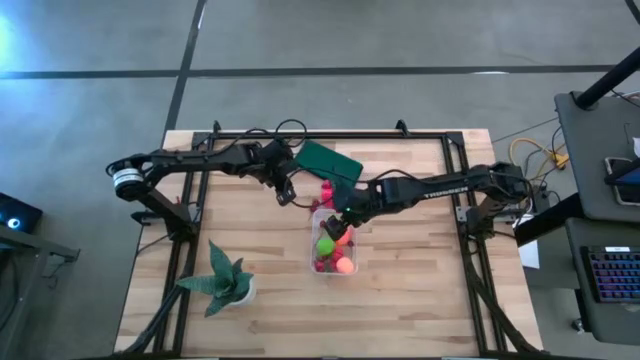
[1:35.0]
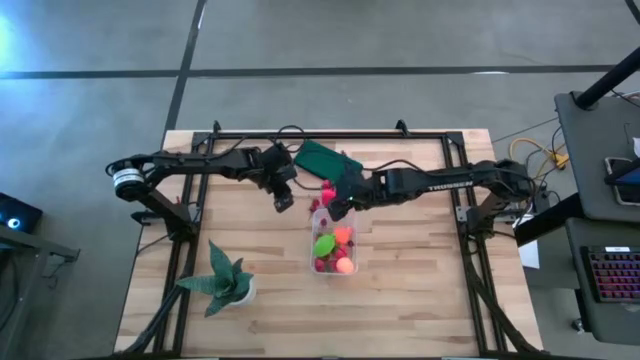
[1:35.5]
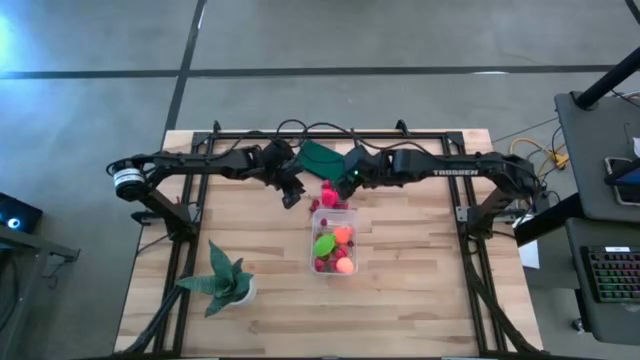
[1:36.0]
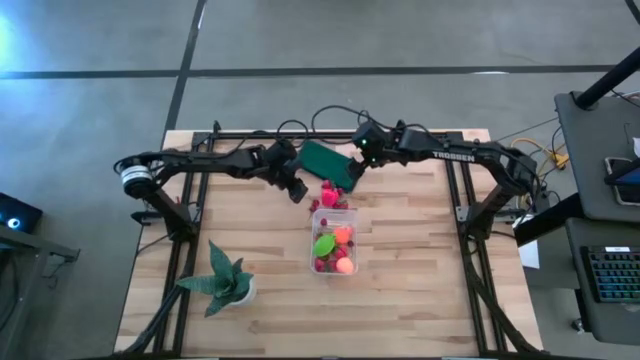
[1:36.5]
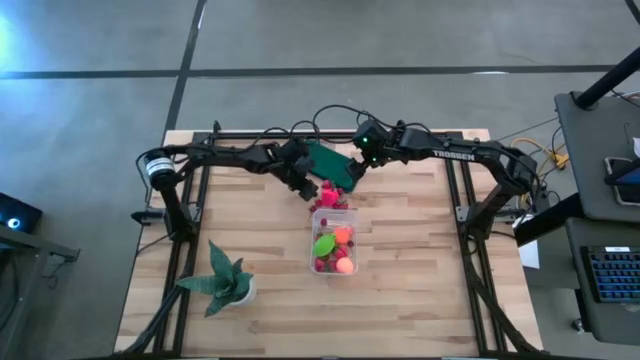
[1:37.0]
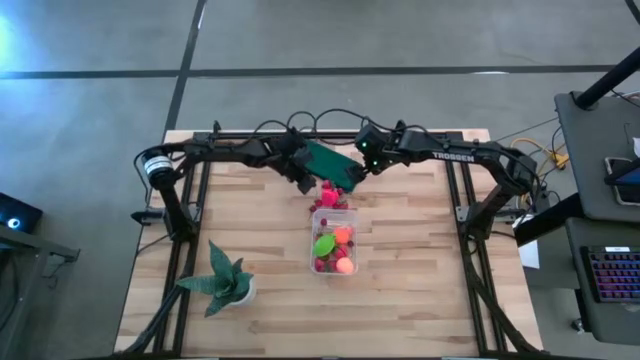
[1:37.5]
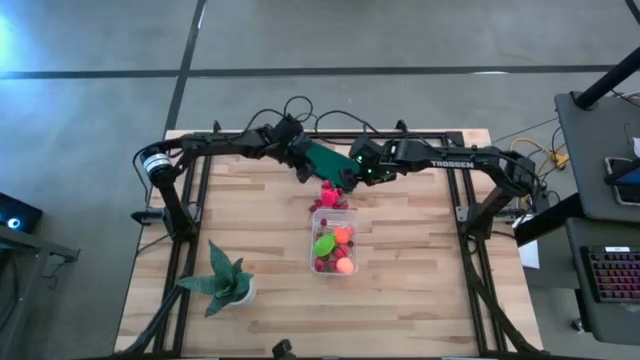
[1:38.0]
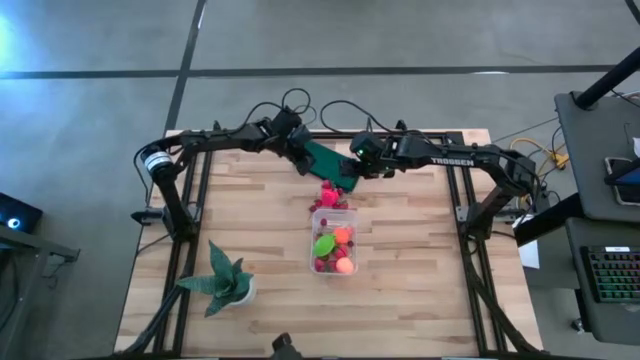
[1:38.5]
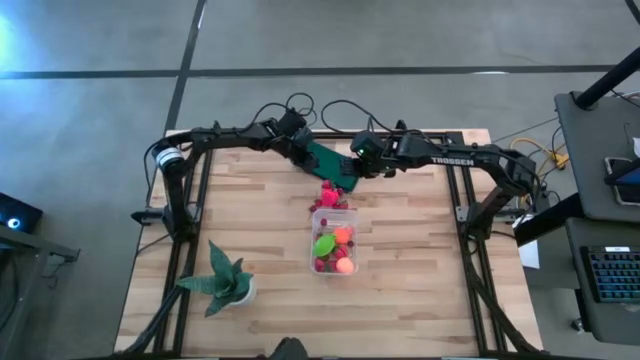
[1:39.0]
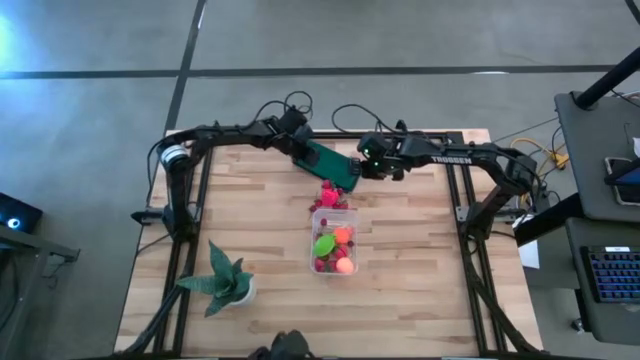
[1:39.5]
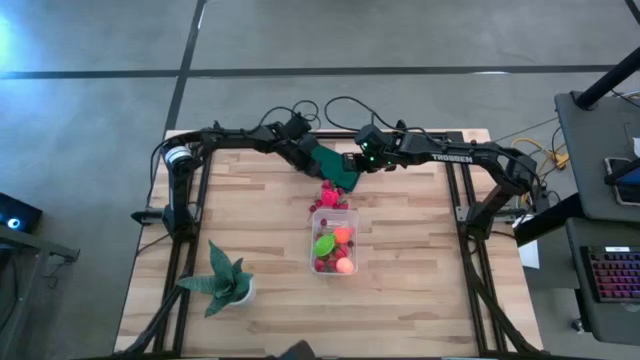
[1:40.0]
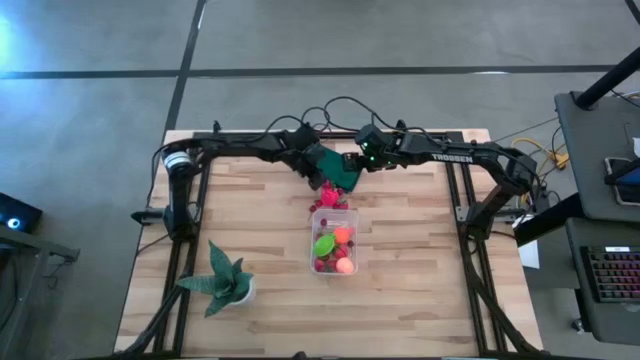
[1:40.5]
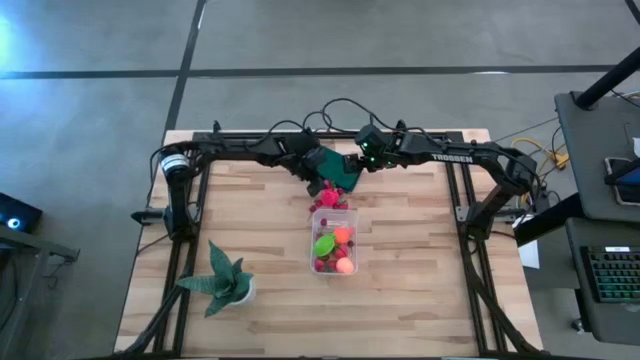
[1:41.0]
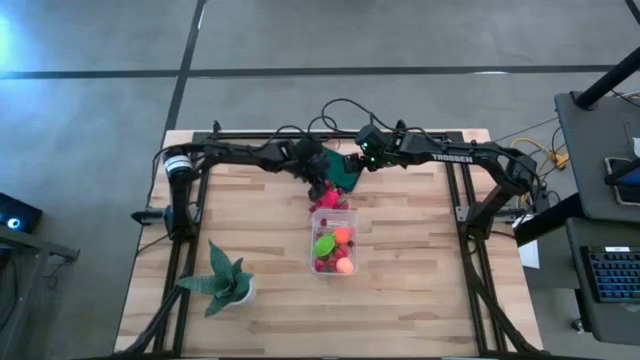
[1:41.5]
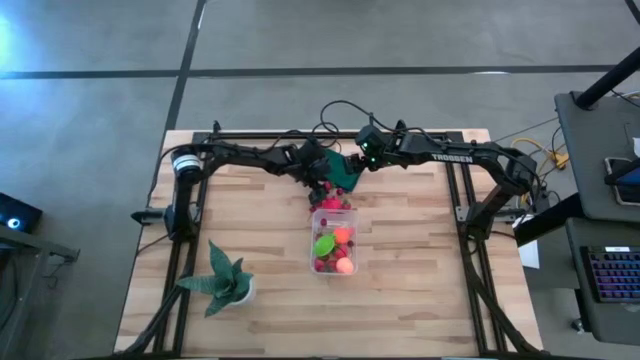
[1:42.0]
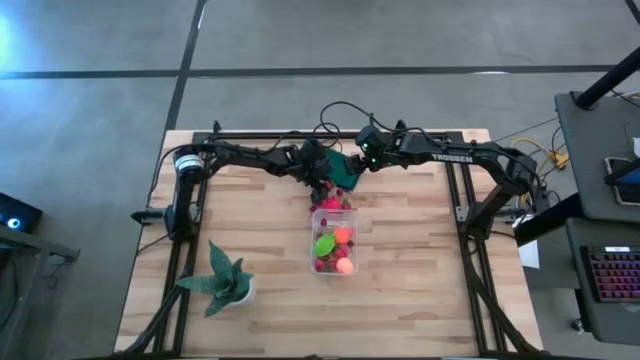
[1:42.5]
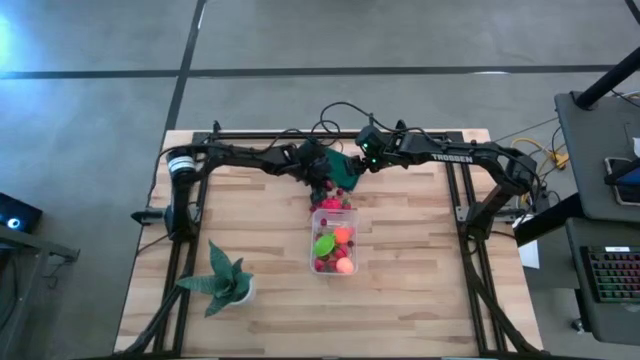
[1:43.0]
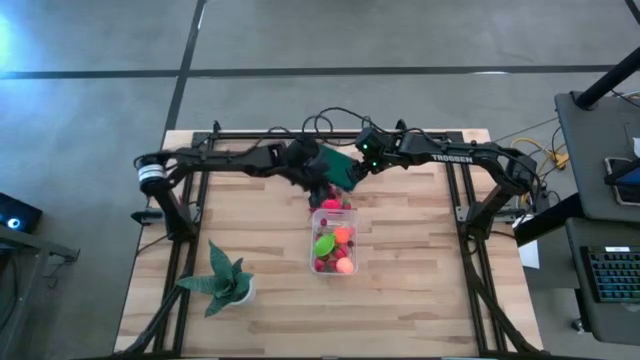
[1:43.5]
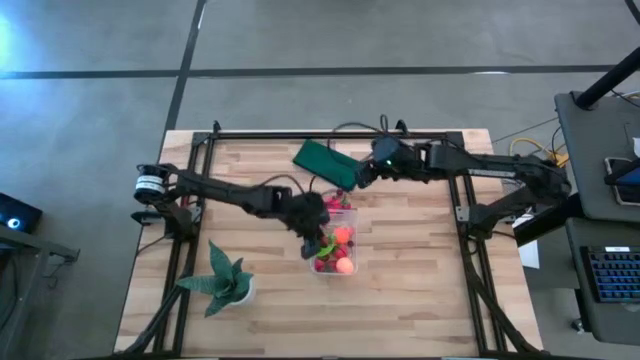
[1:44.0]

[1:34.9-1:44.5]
Task: Pick and placing Produce into tupperware
Put the red strawberry into the transparent bin

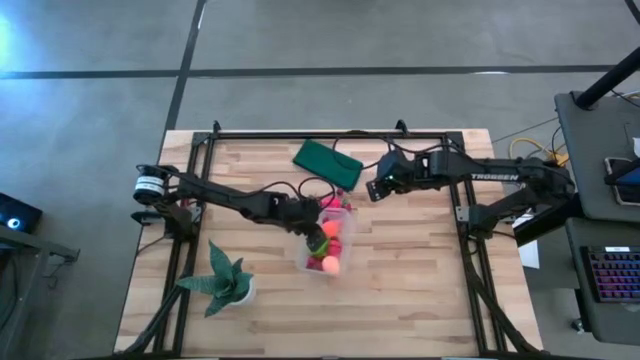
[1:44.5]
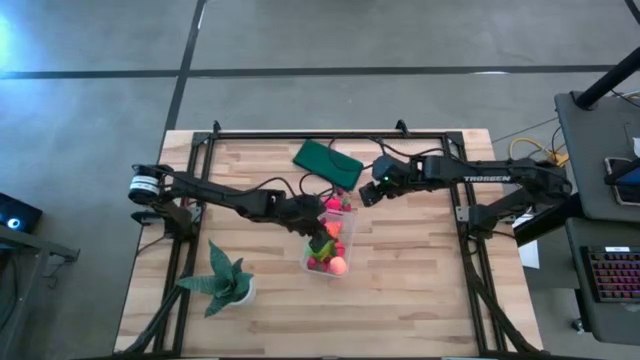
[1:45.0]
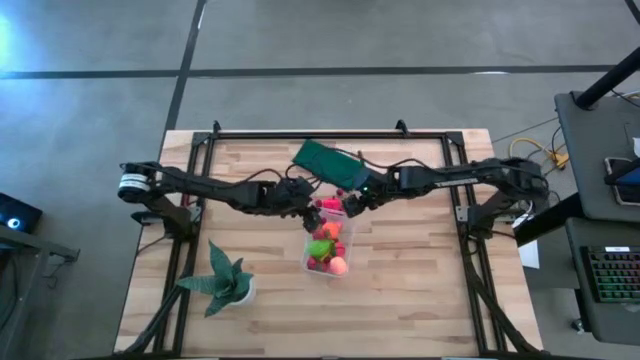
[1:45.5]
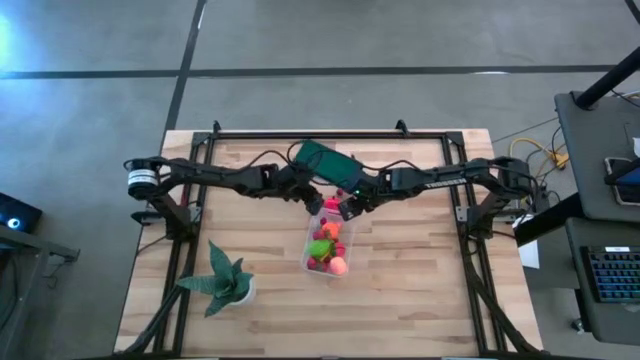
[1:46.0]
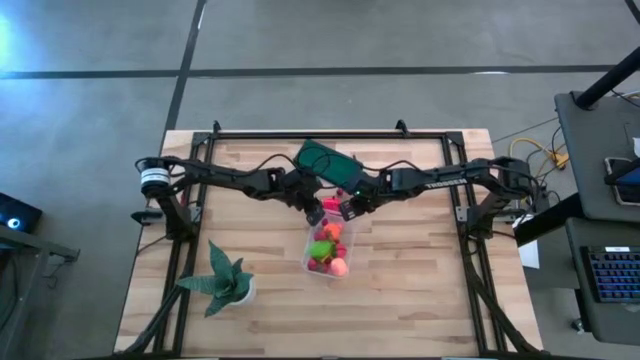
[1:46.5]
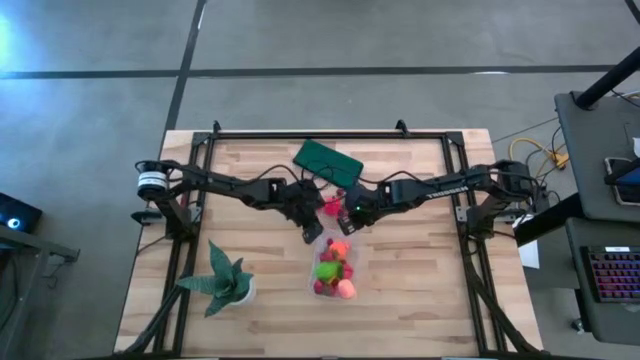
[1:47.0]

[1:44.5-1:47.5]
Move the transparent bin to the middle of the table

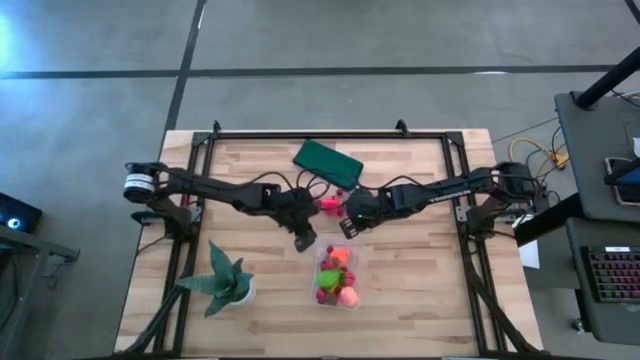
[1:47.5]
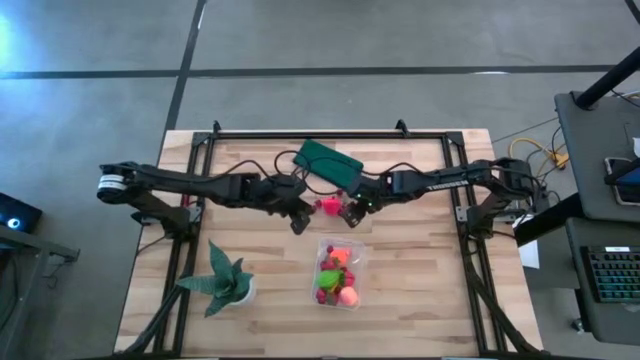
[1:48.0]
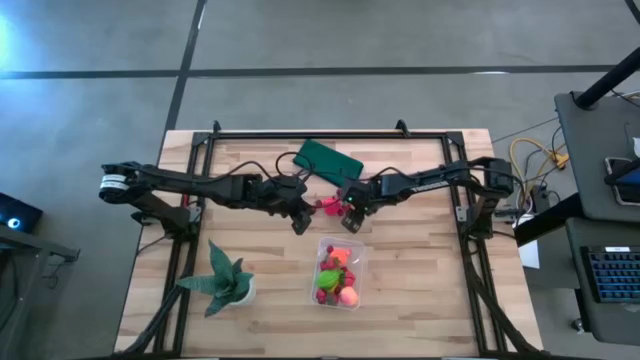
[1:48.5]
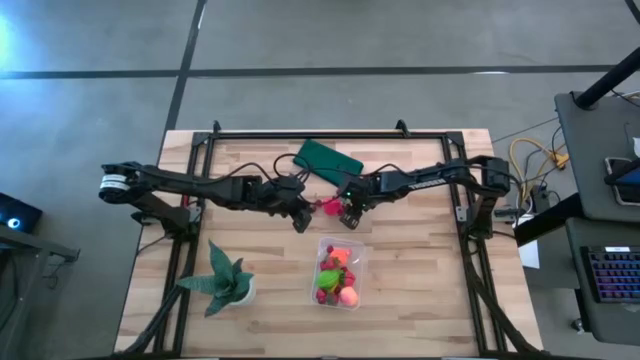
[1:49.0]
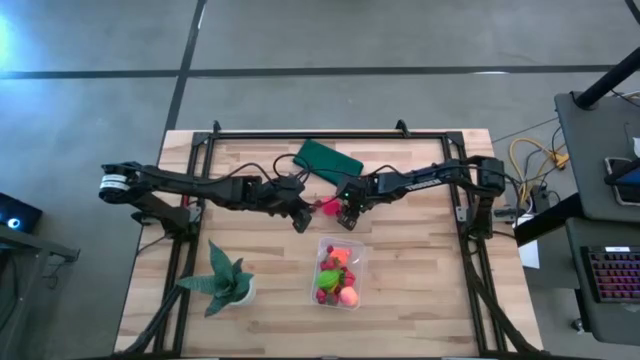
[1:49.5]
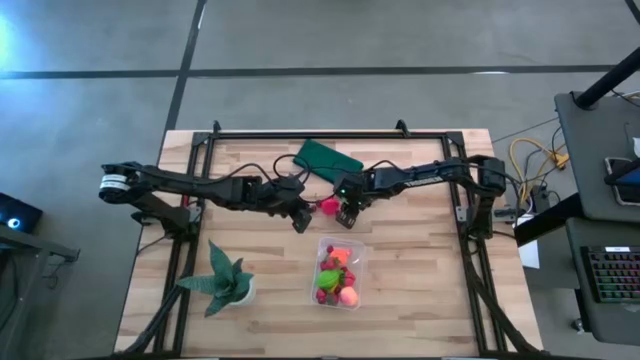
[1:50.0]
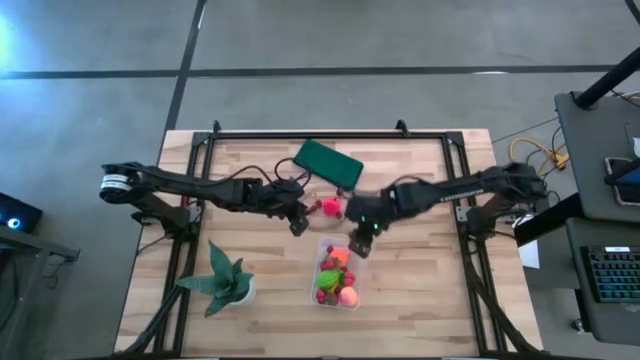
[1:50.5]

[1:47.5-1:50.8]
Put the red strawberry into the transparent bin

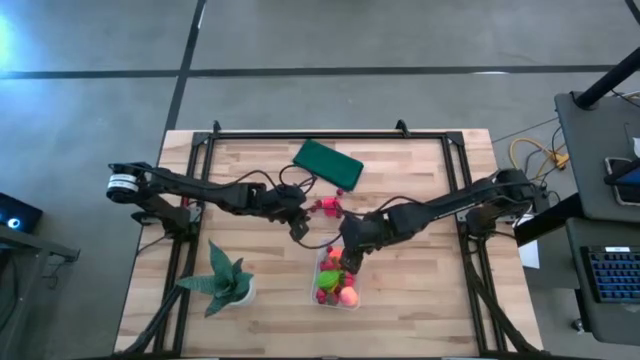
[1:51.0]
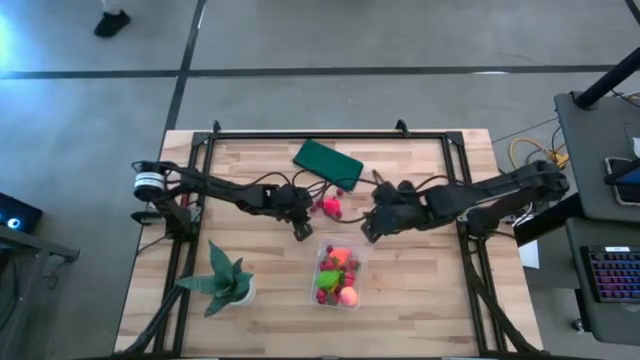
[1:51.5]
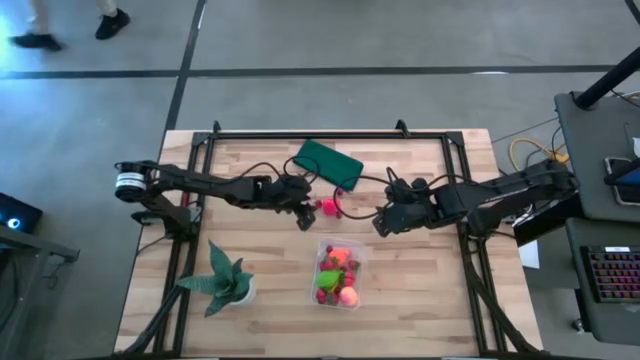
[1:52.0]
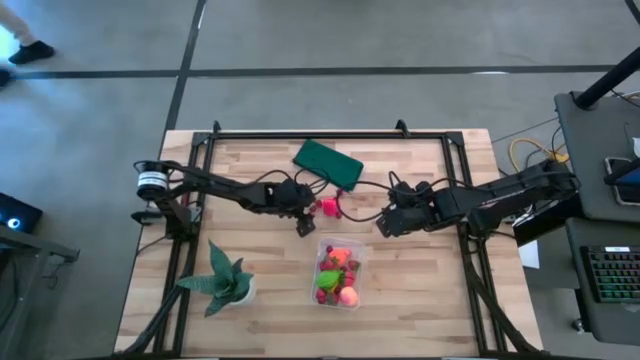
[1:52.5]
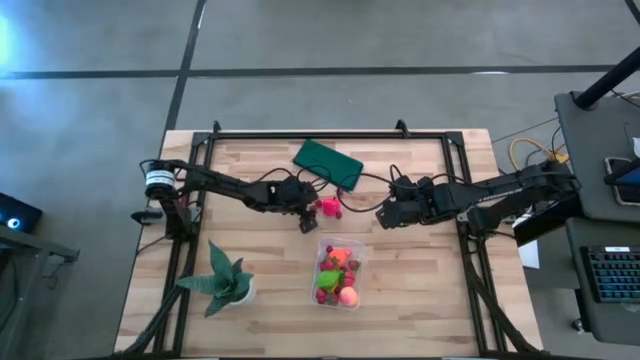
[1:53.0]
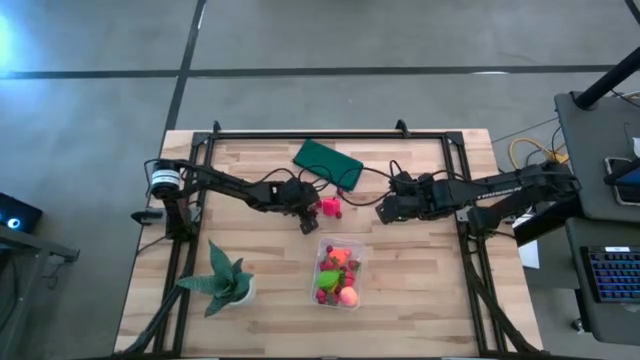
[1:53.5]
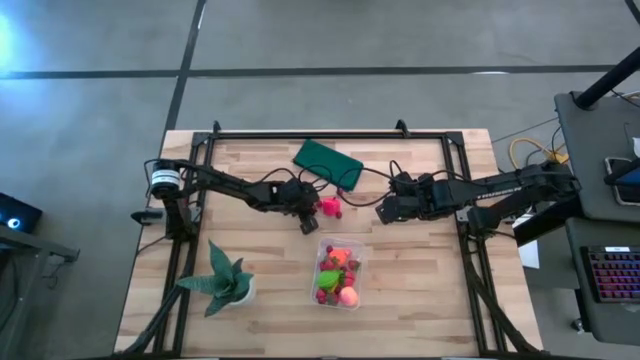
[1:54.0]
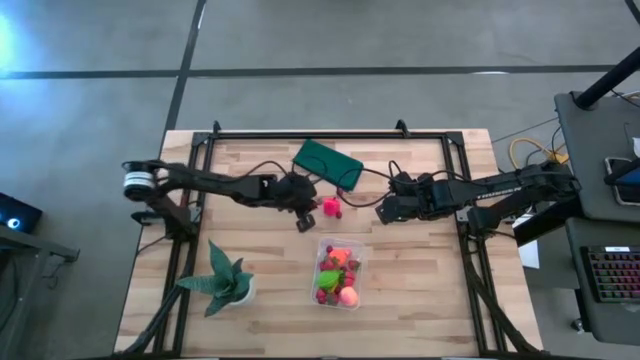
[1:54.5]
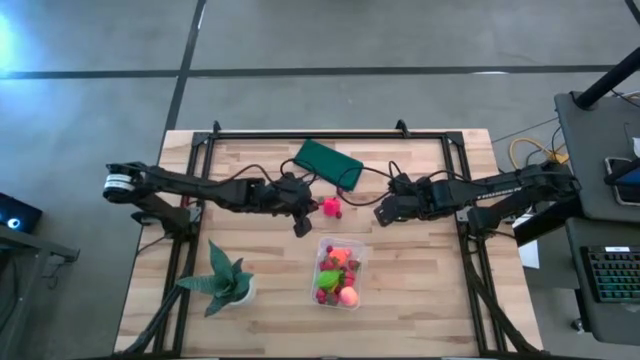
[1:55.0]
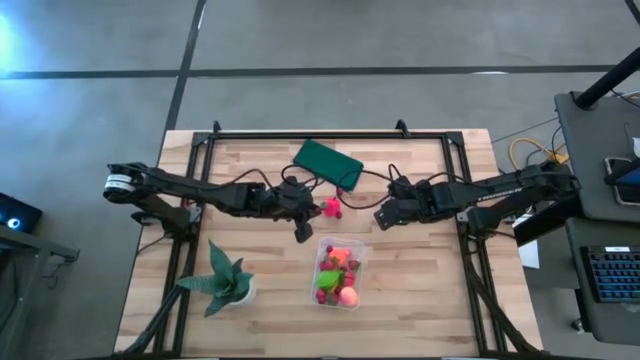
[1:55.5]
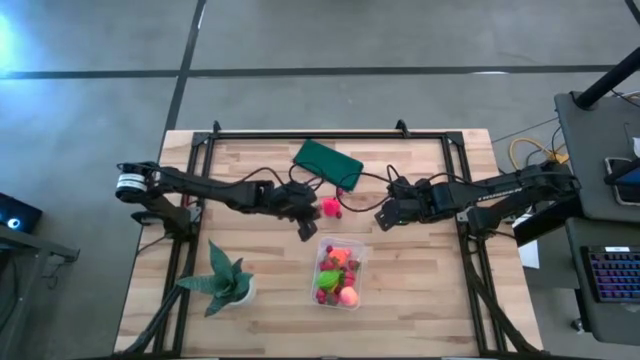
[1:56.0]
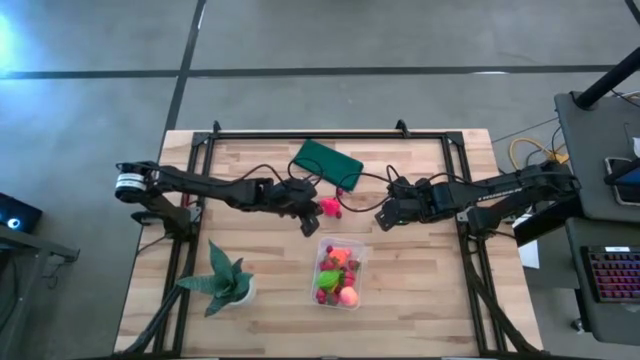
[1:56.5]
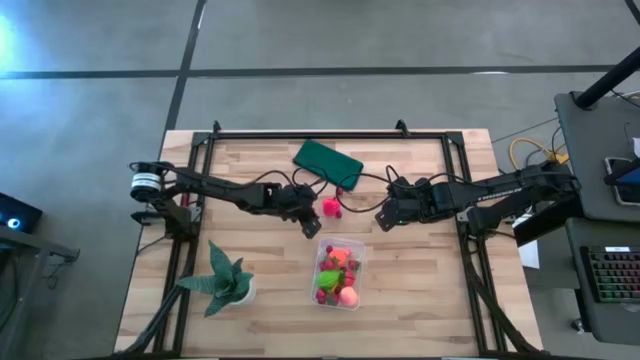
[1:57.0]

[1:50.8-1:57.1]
Put the red cherry into the transparent bin
